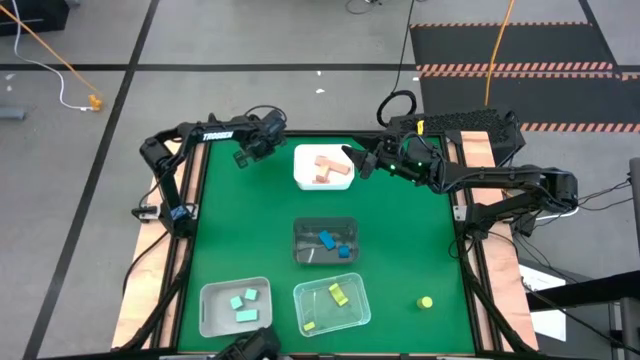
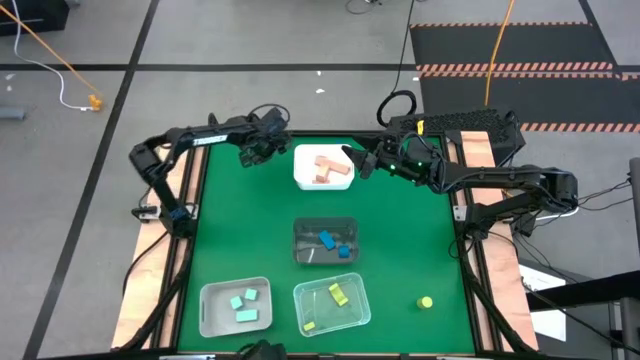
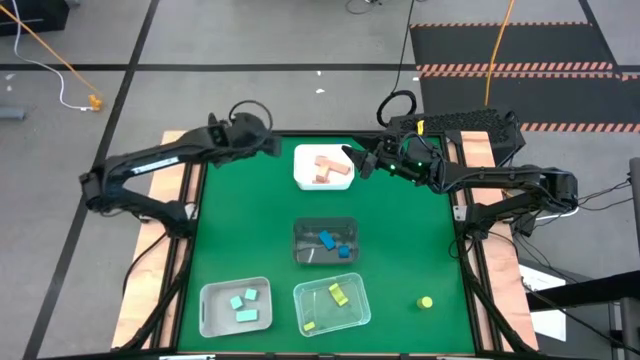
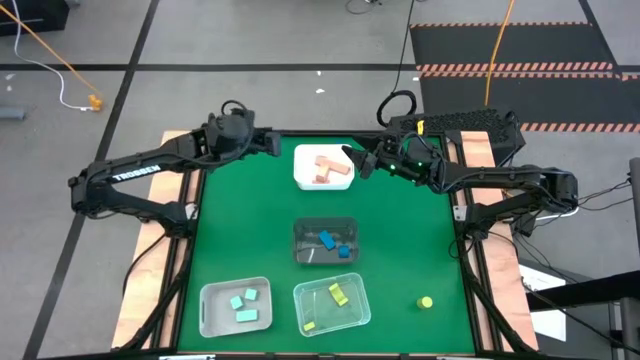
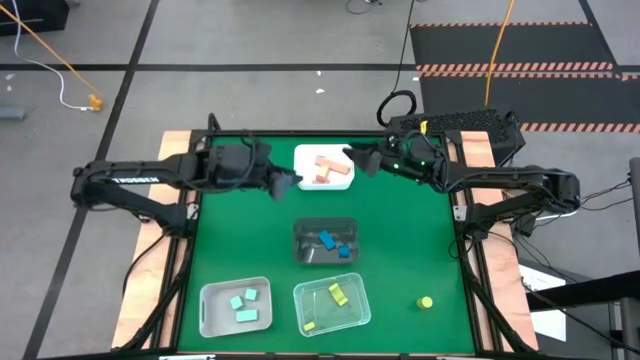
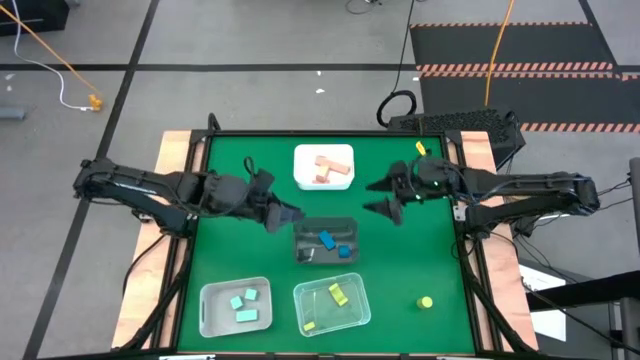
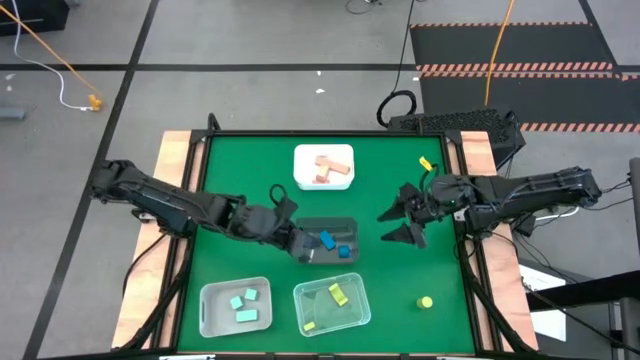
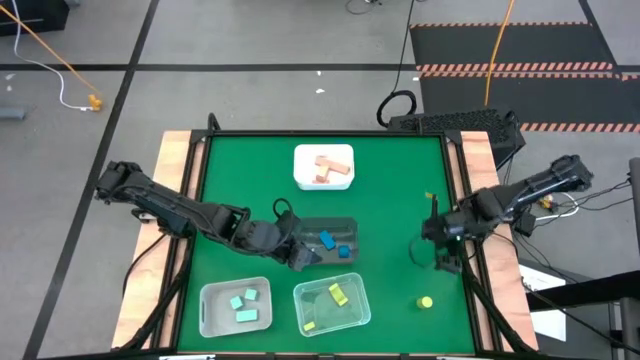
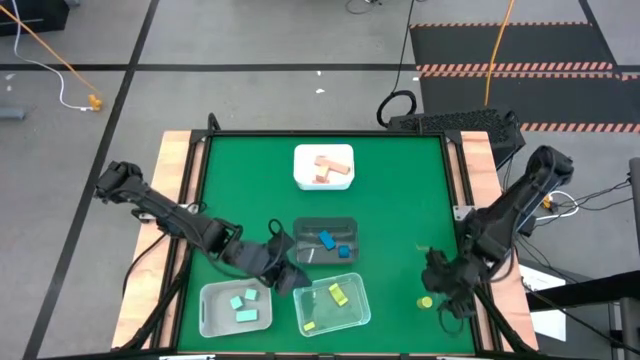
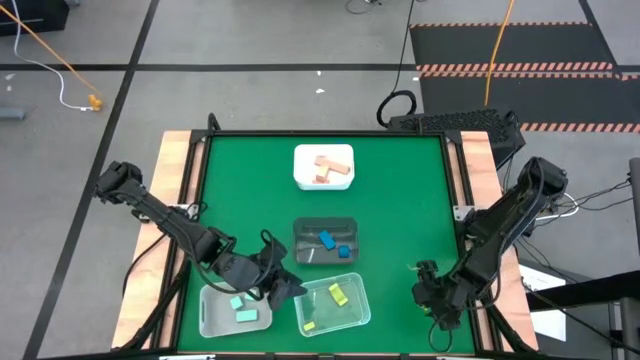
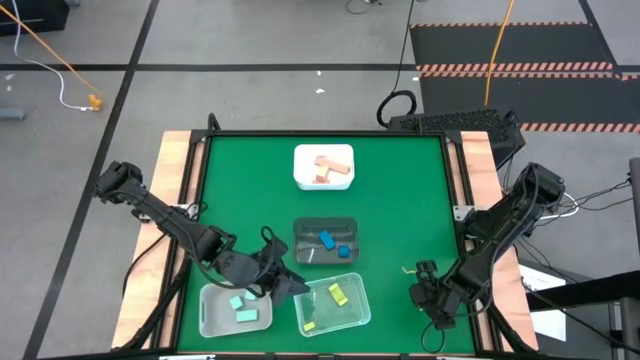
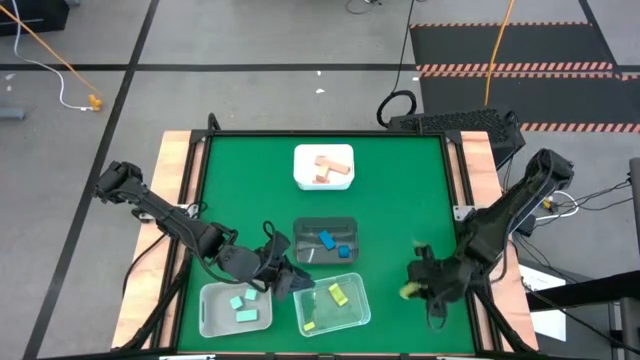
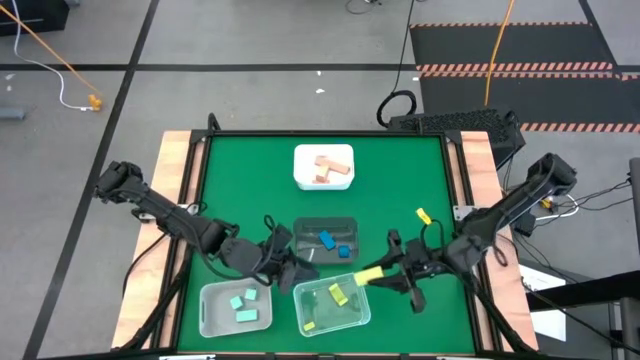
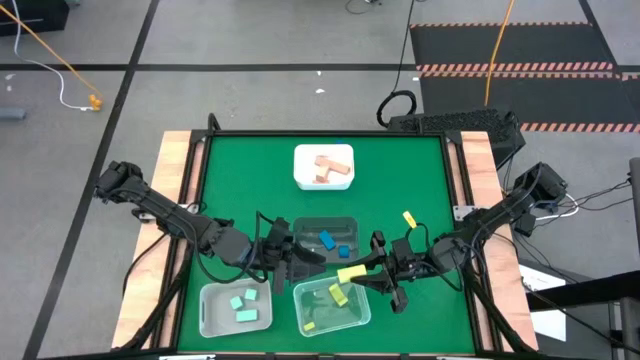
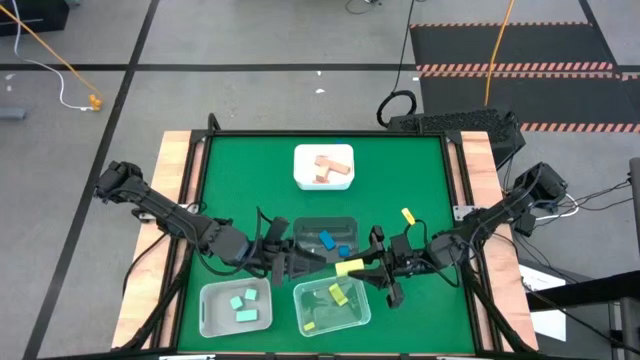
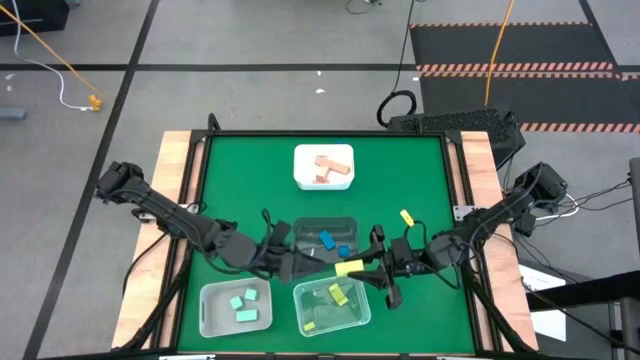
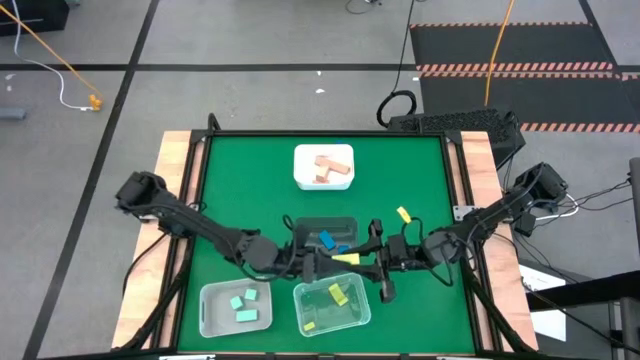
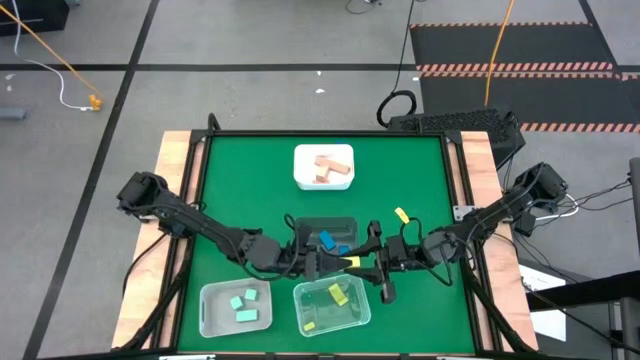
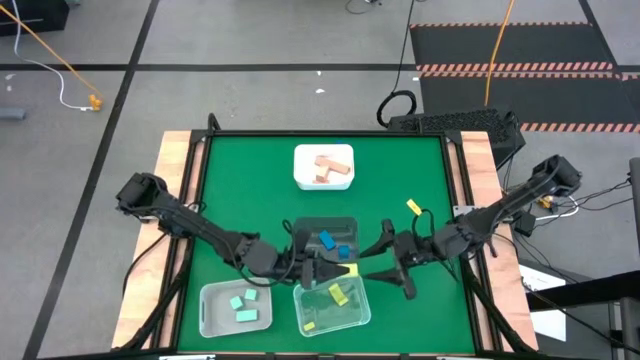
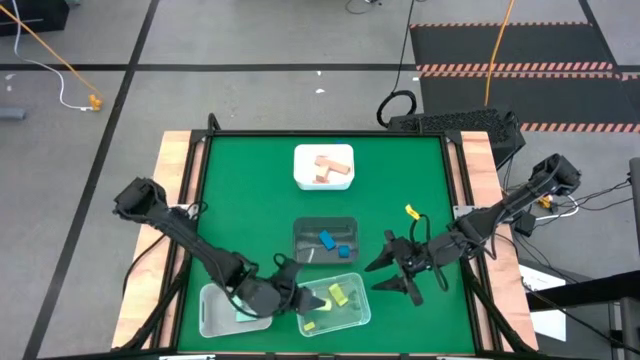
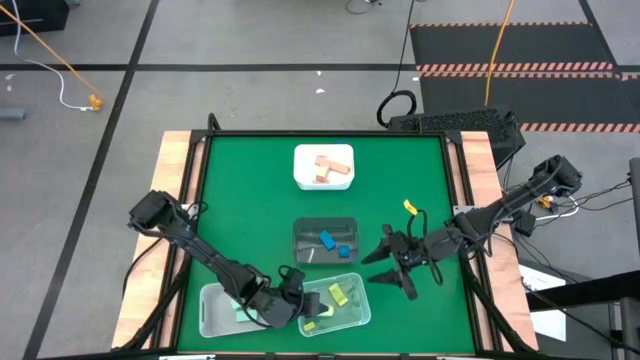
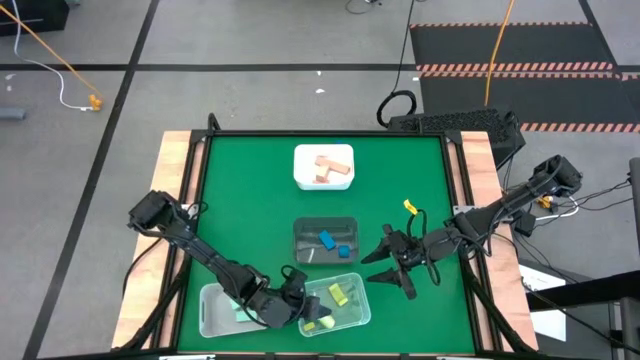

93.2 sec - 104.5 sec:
Task: Sort & place blocks by color
Put the green block into the transparent bin

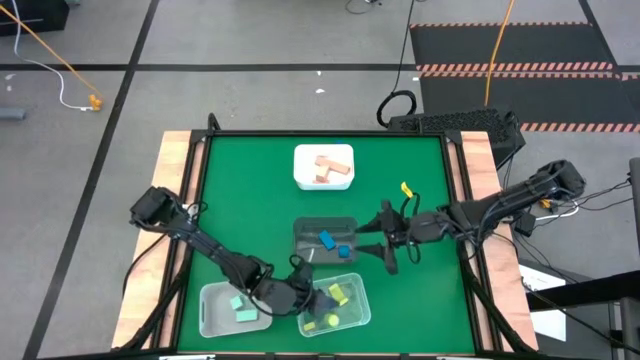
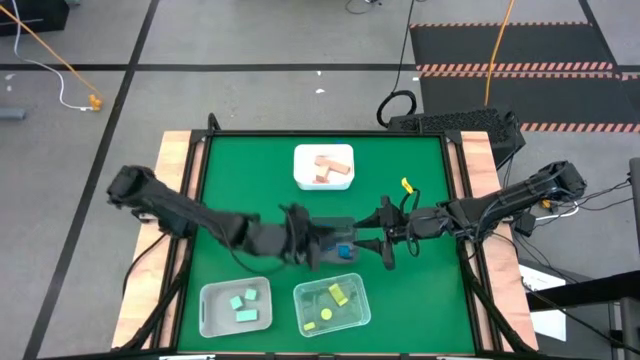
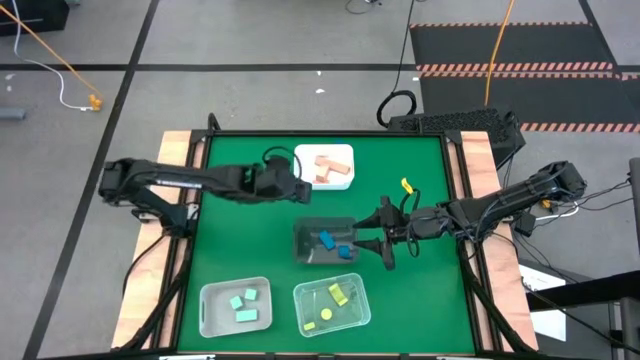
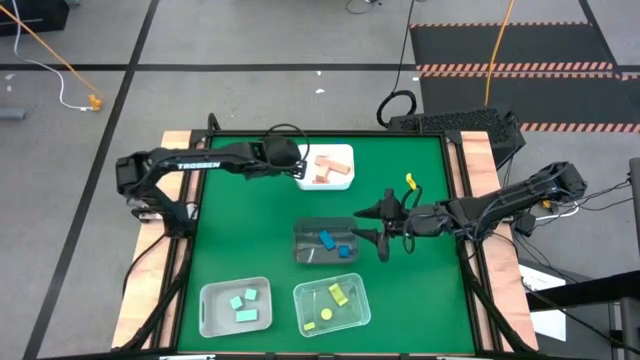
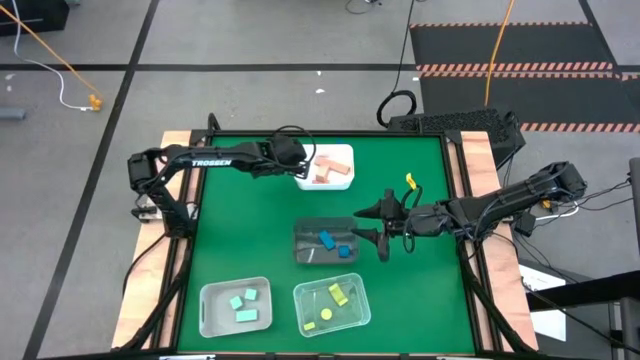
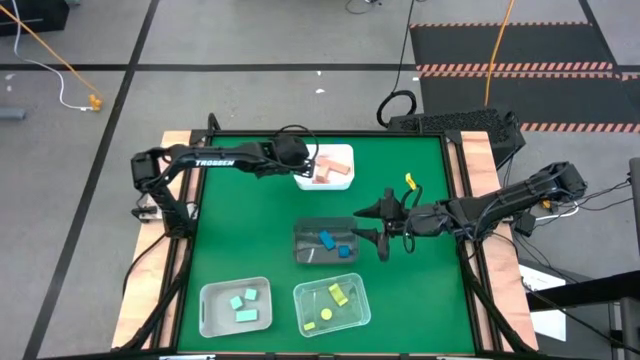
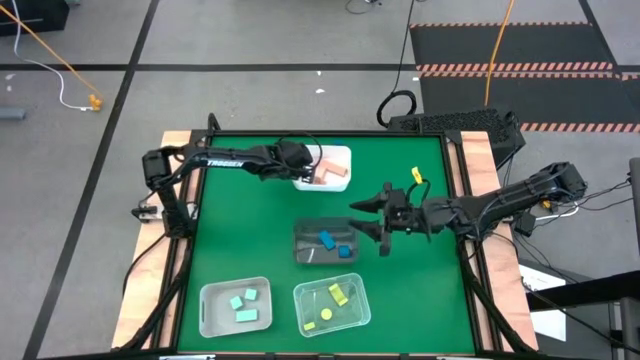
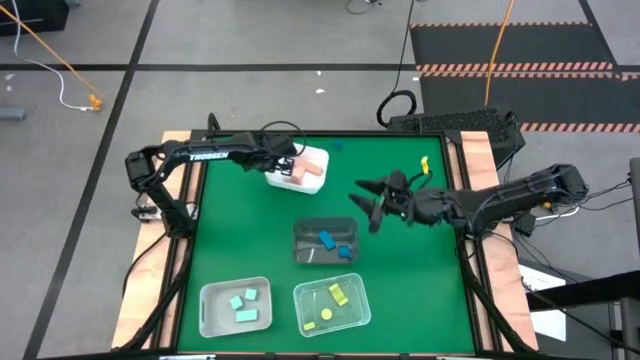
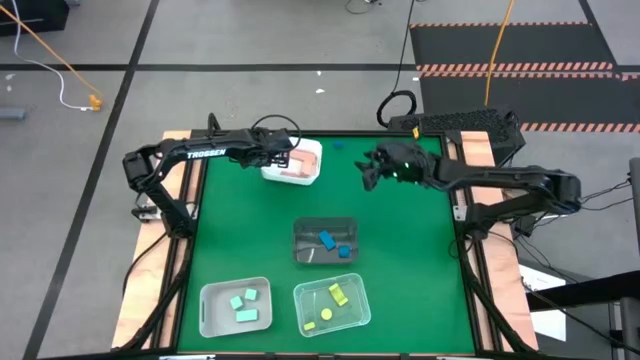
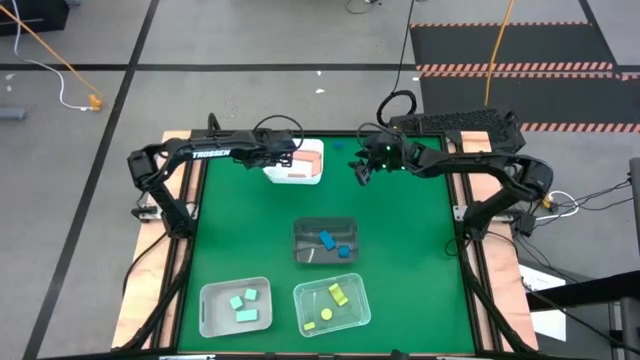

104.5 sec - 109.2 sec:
Adjust the white bin

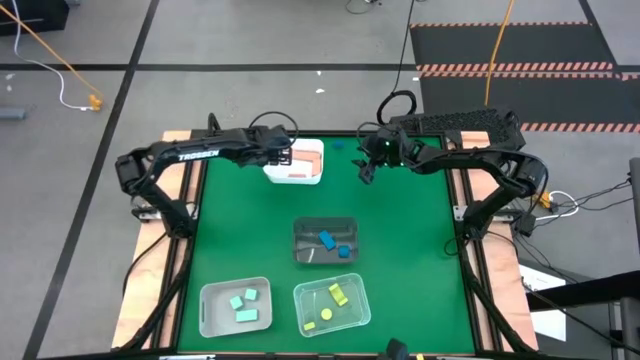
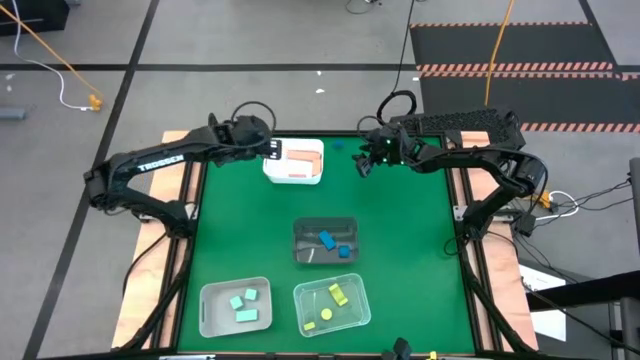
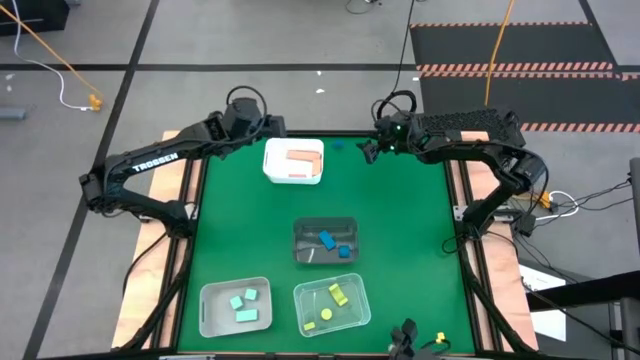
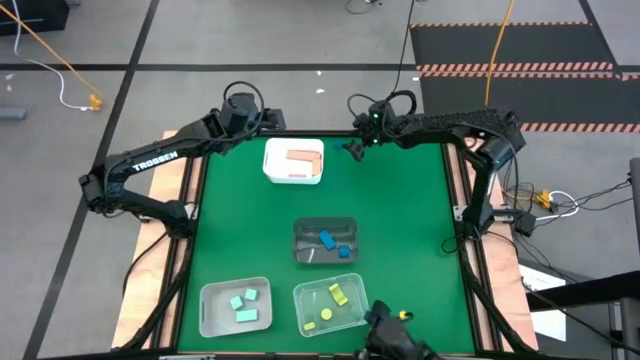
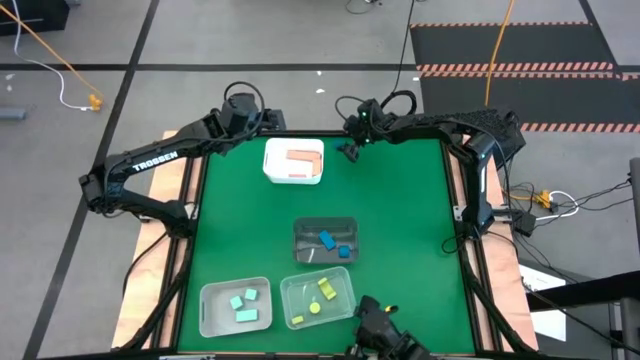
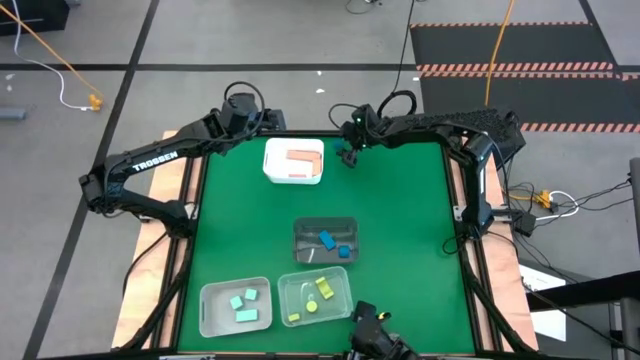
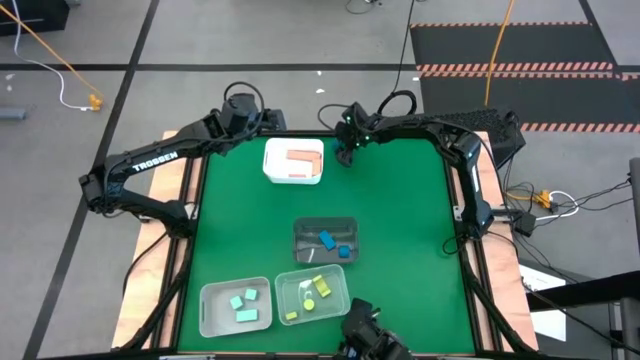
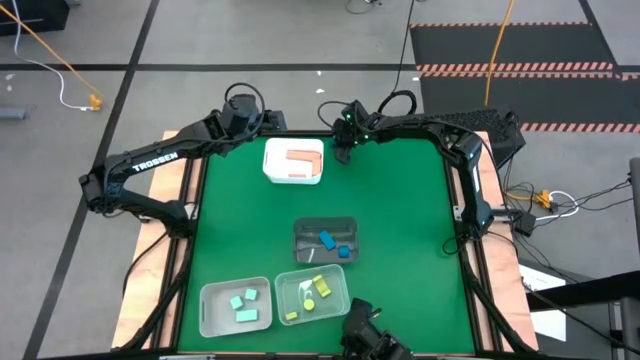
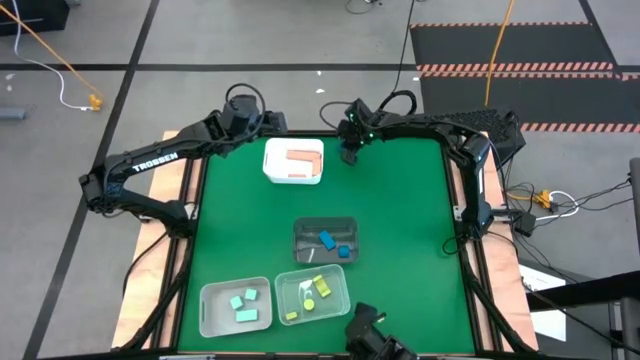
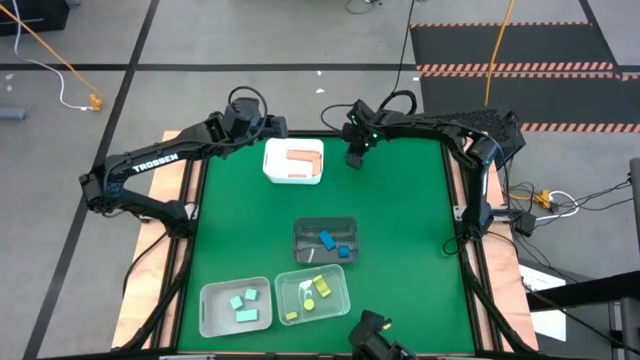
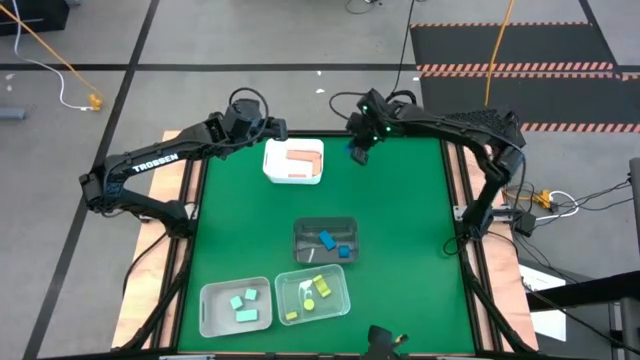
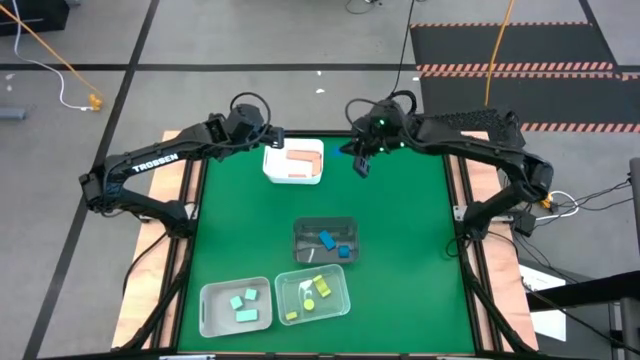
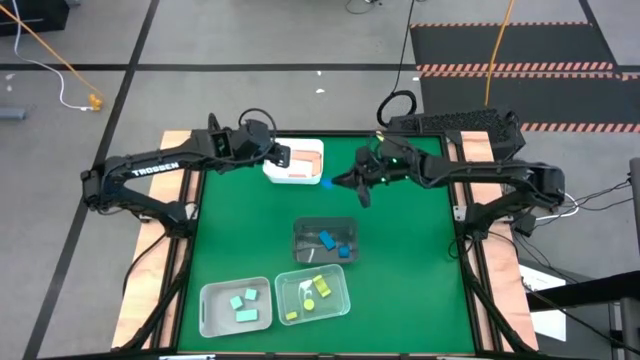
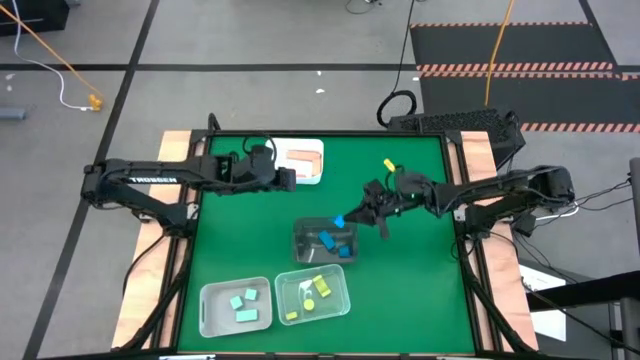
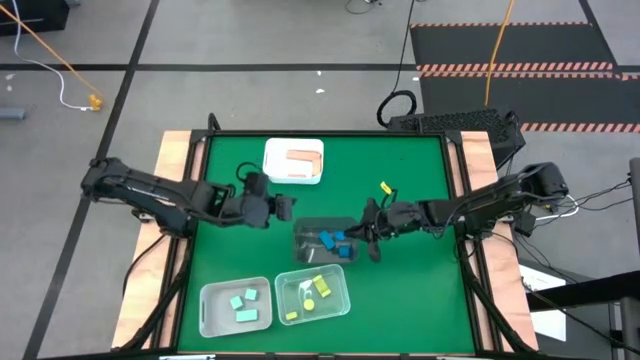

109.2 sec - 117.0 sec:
Put the blue block into the black bin
